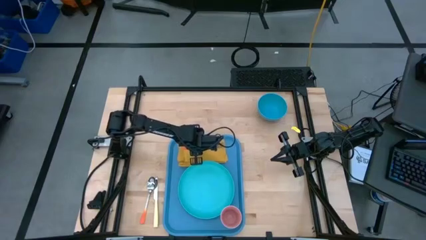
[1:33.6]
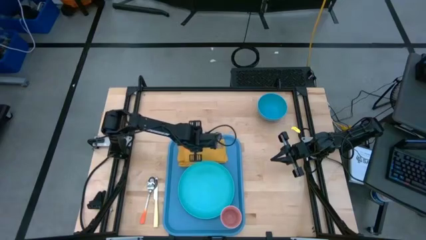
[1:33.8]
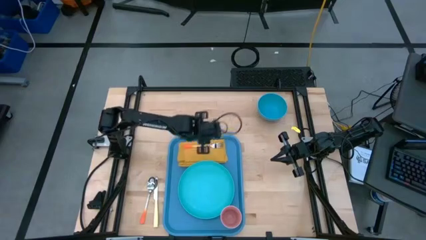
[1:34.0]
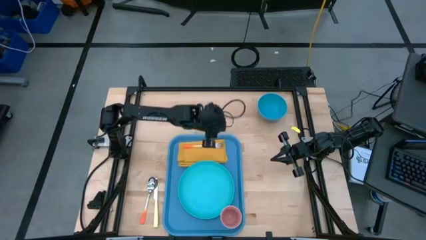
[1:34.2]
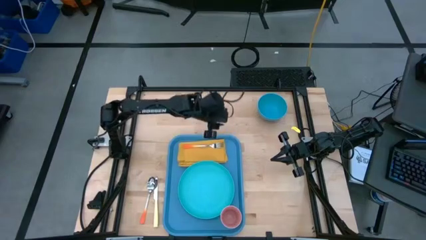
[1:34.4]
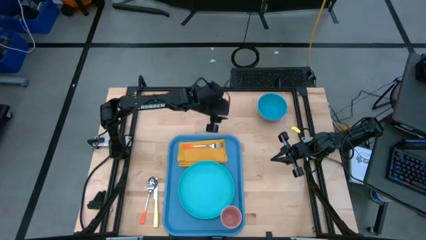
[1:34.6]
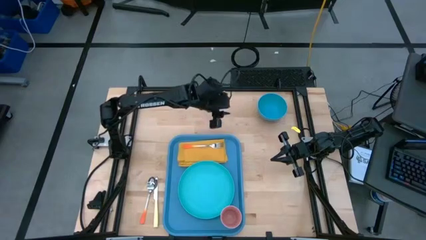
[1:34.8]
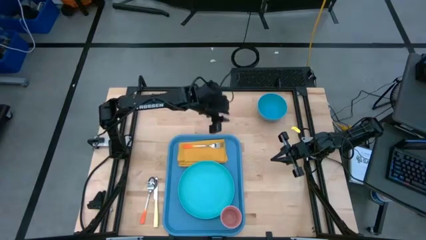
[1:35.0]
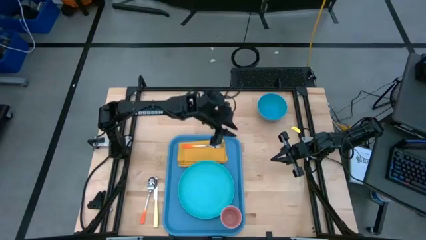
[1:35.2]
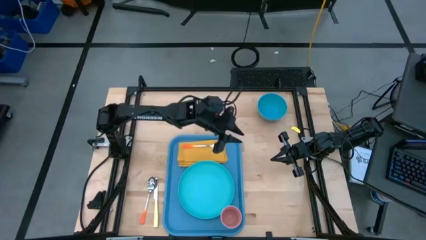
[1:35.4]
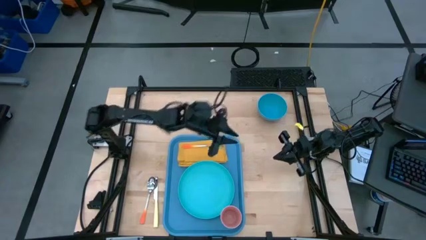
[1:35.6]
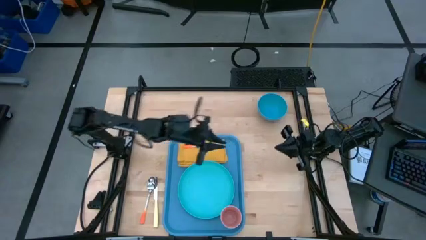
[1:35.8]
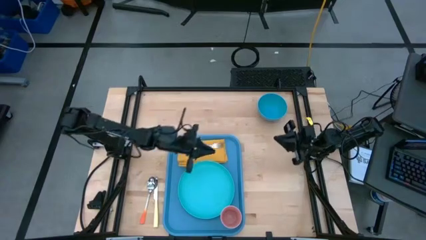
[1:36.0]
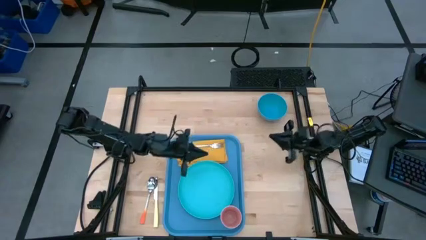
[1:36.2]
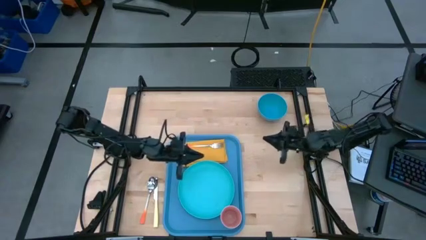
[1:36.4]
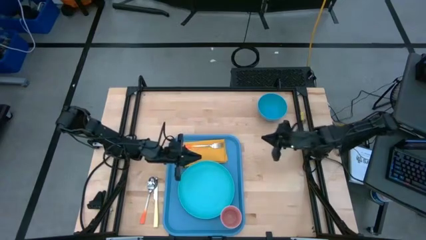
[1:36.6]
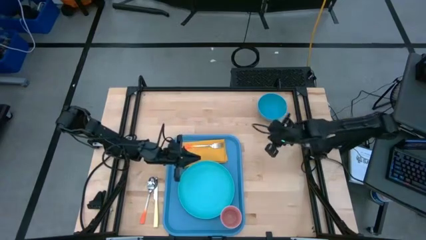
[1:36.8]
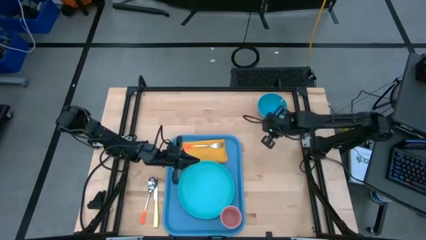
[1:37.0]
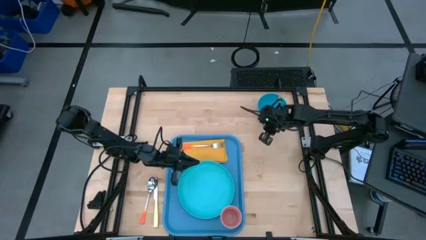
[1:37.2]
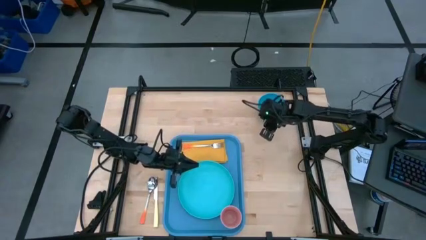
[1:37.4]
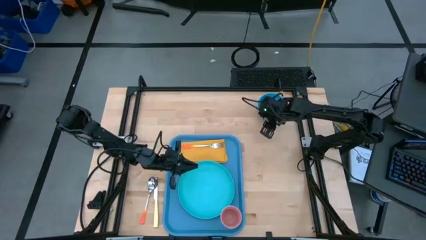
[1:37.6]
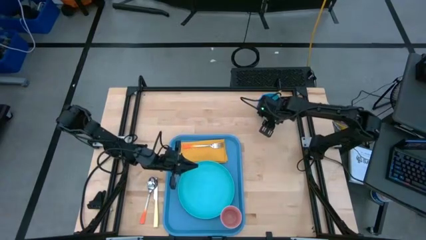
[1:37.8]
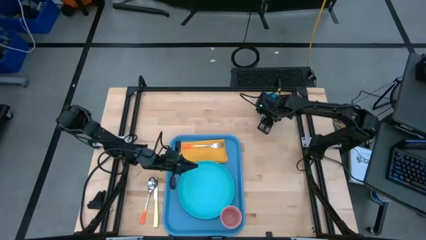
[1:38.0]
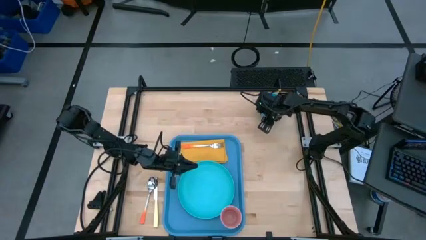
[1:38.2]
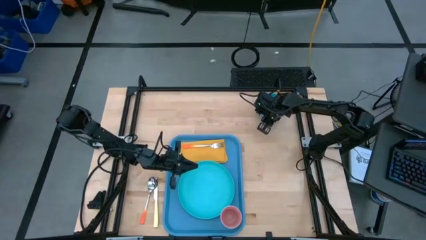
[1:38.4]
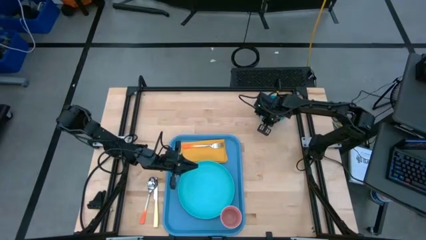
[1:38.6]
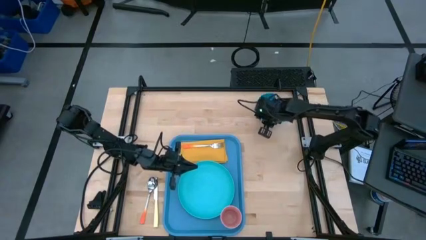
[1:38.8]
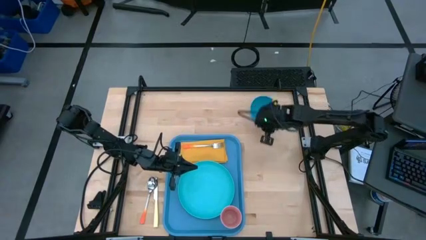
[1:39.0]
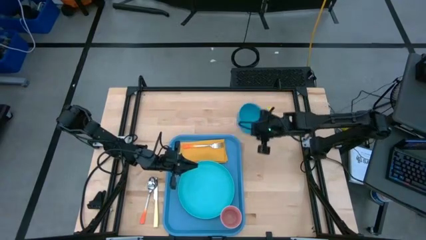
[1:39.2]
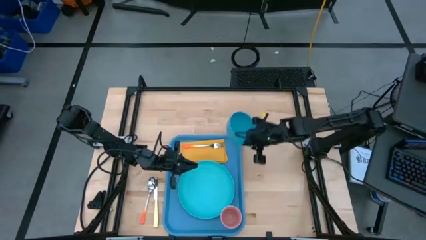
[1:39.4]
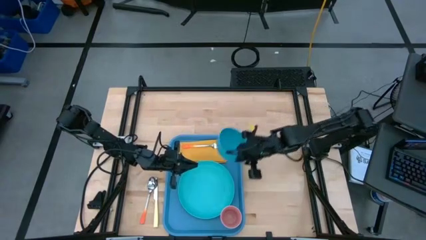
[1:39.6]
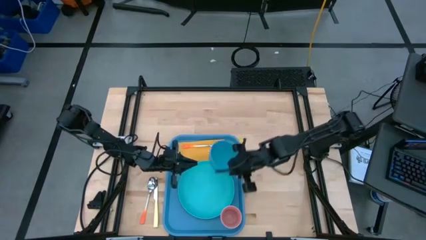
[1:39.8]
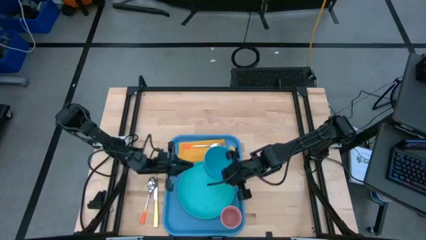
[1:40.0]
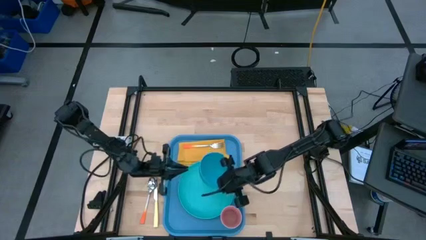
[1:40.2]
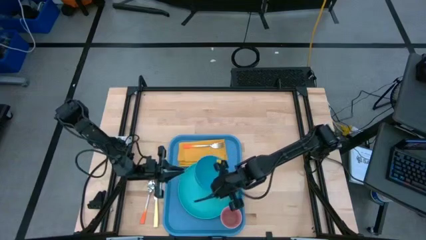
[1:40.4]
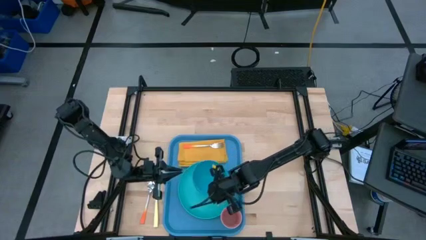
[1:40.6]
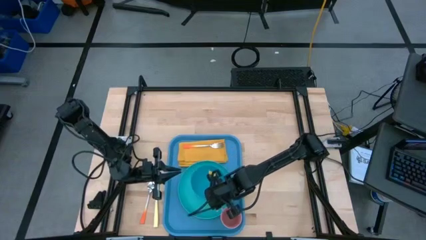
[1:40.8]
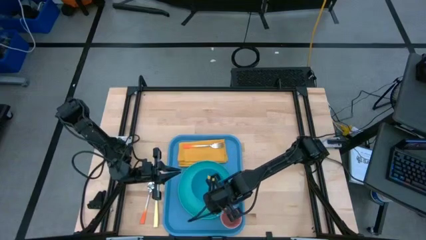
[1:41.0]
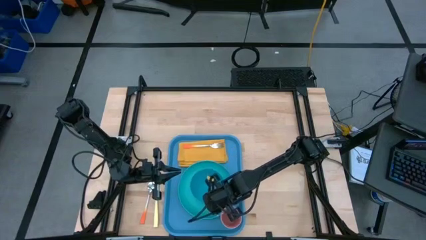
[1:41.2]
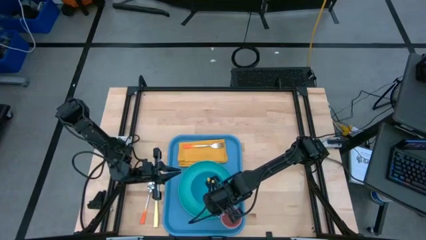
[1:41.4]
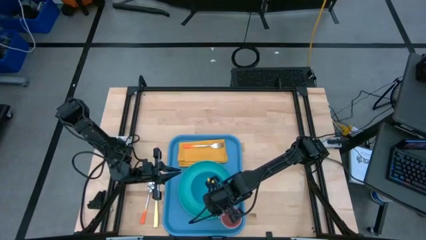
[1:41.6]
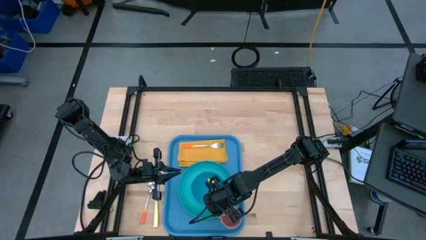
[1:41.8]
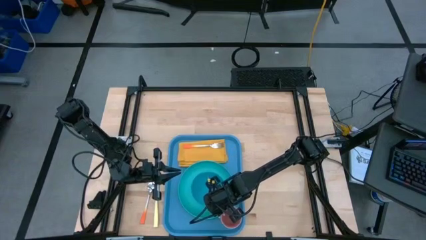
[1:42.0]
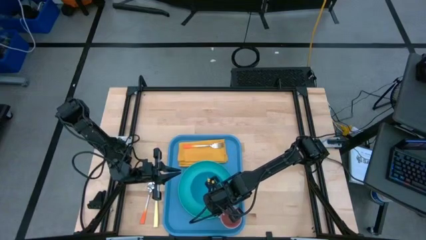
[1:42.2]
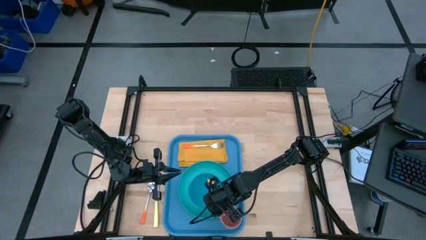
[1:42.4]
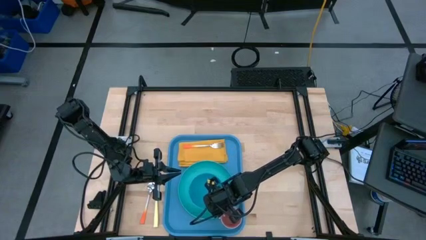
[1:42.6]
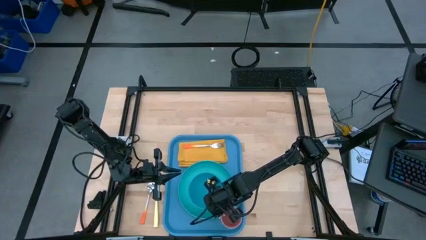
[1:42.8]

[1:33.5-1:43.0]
Task: Set up tray
Put the blue bowl on the blue plate on the blue serving tray

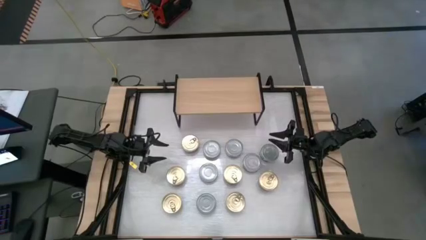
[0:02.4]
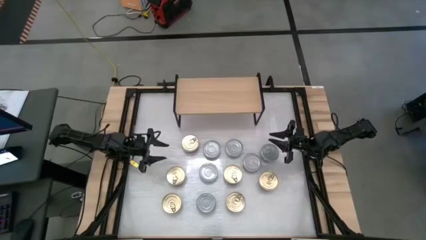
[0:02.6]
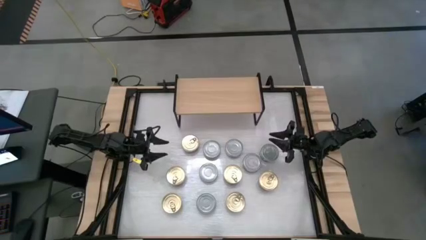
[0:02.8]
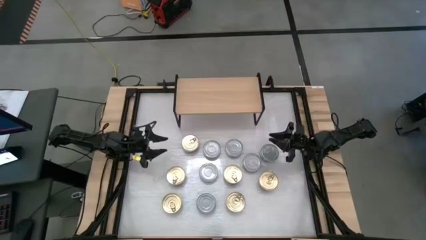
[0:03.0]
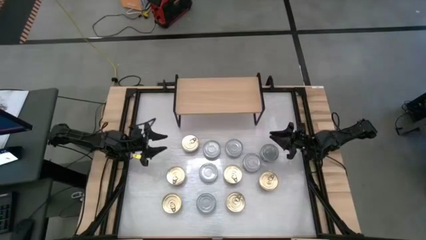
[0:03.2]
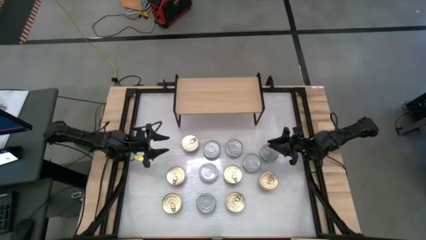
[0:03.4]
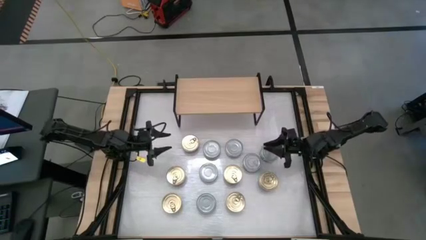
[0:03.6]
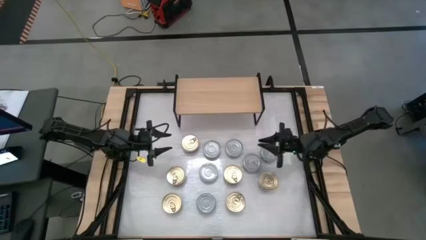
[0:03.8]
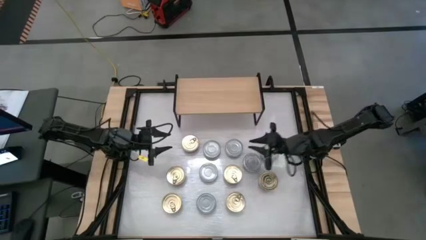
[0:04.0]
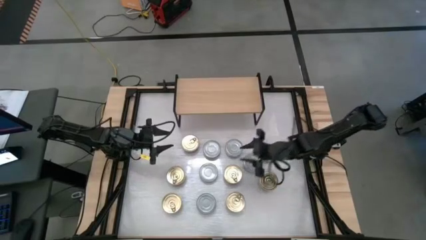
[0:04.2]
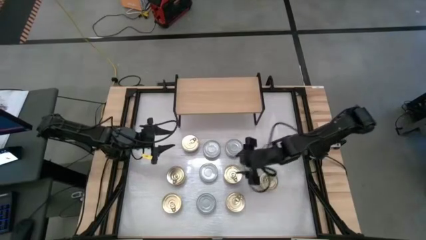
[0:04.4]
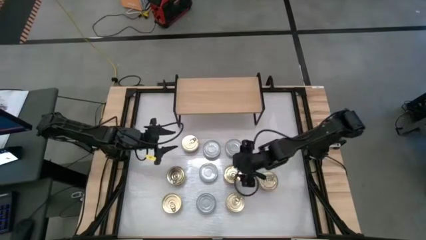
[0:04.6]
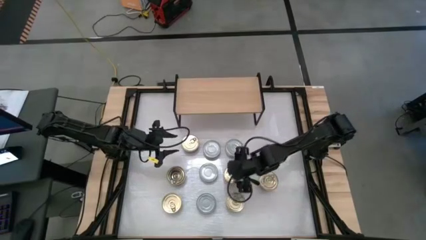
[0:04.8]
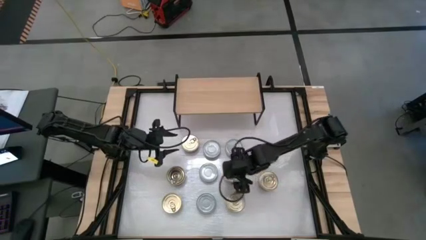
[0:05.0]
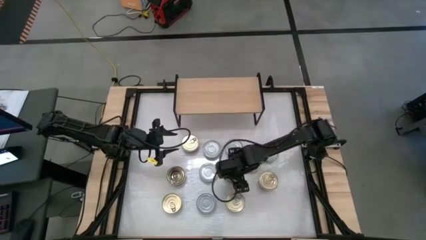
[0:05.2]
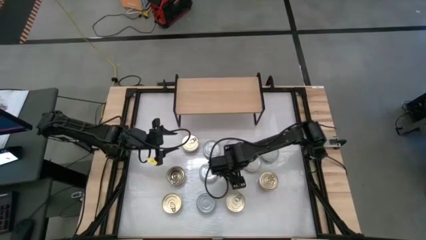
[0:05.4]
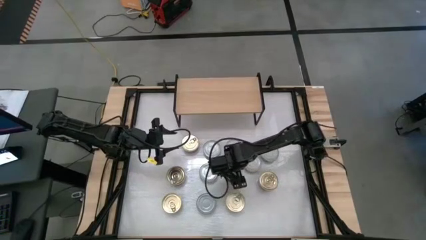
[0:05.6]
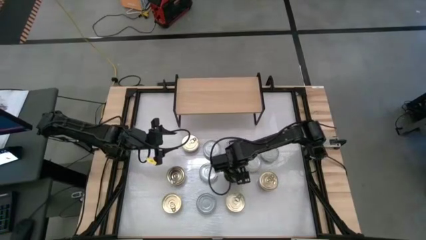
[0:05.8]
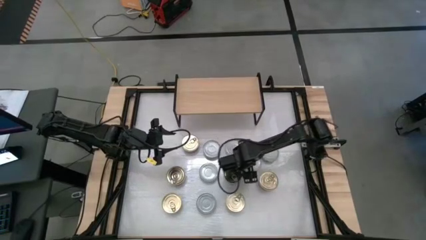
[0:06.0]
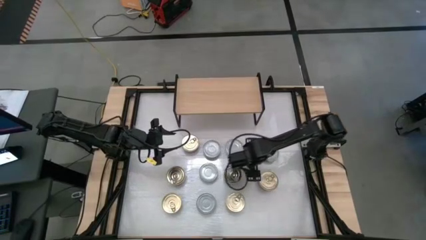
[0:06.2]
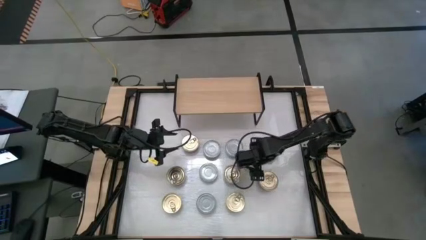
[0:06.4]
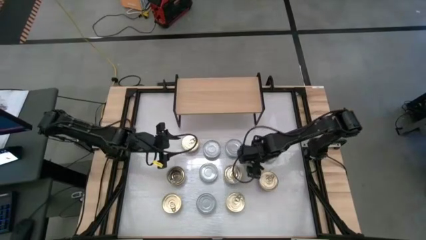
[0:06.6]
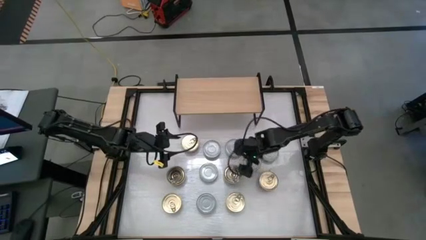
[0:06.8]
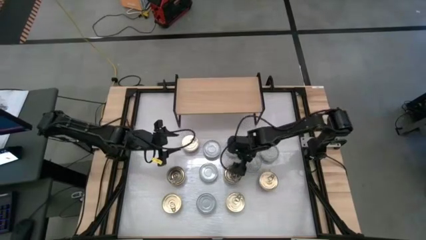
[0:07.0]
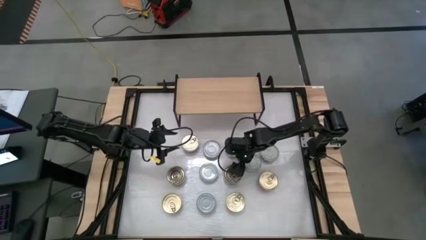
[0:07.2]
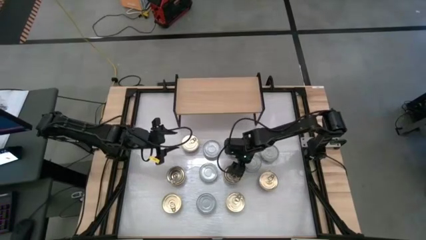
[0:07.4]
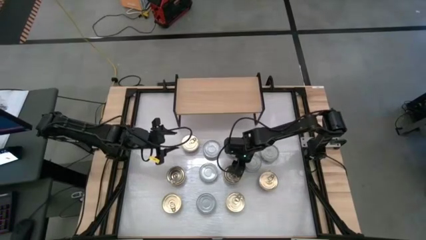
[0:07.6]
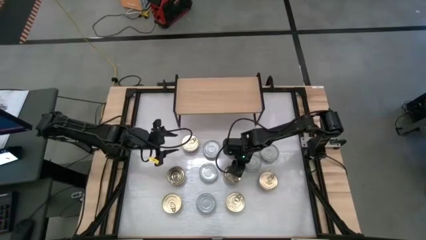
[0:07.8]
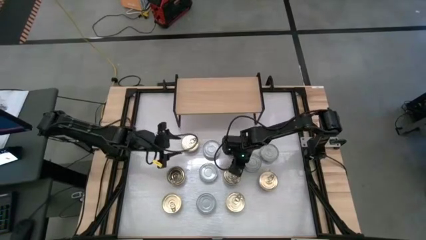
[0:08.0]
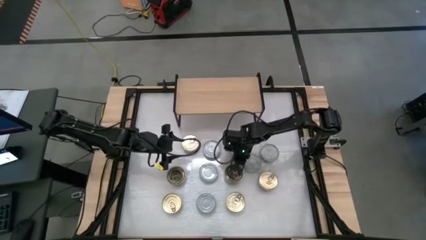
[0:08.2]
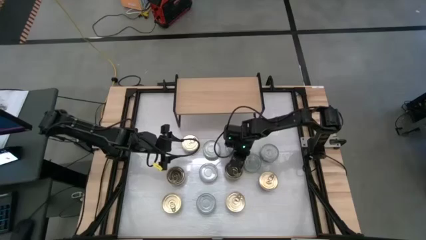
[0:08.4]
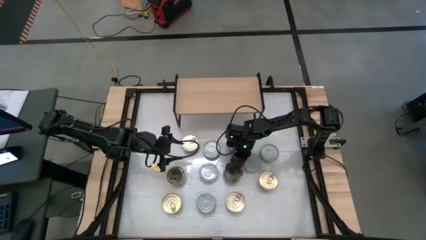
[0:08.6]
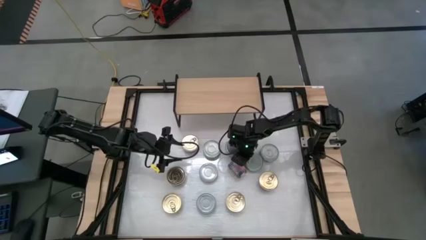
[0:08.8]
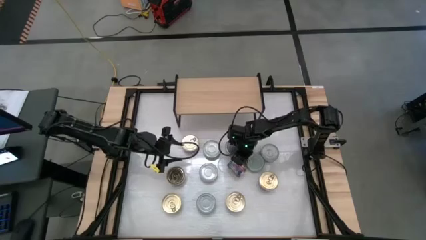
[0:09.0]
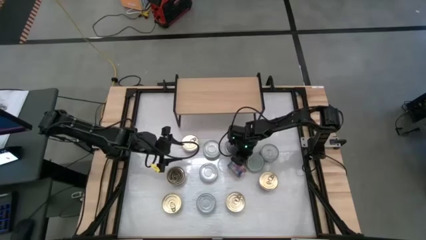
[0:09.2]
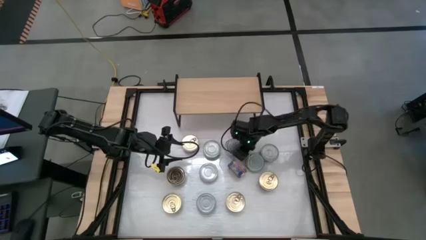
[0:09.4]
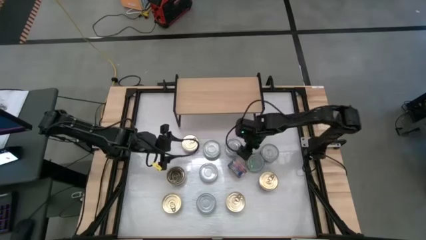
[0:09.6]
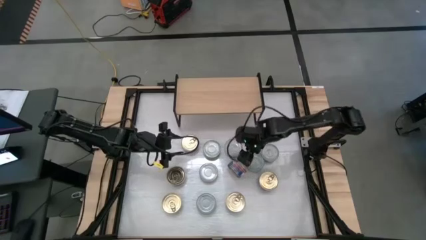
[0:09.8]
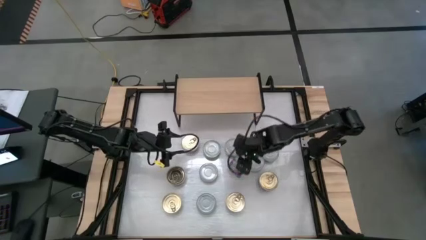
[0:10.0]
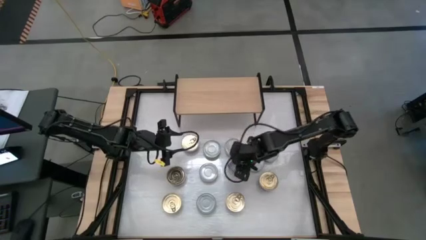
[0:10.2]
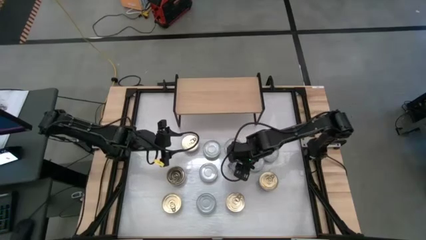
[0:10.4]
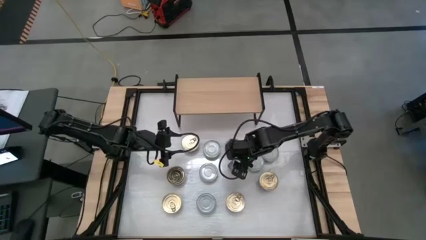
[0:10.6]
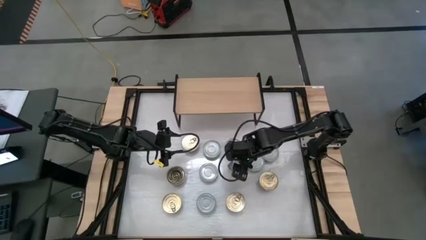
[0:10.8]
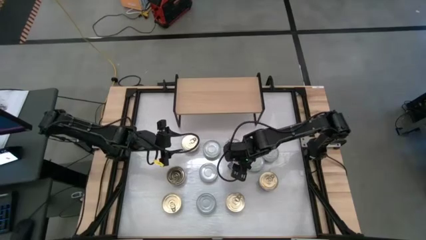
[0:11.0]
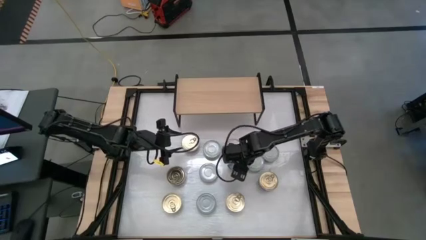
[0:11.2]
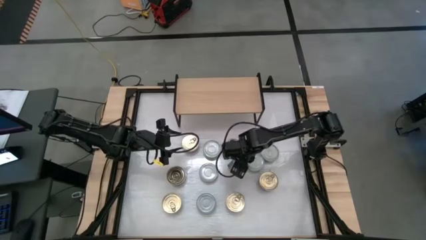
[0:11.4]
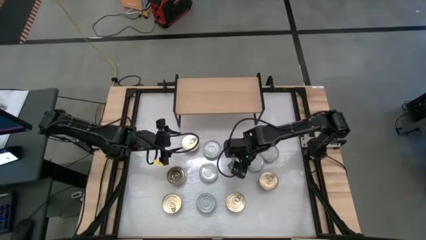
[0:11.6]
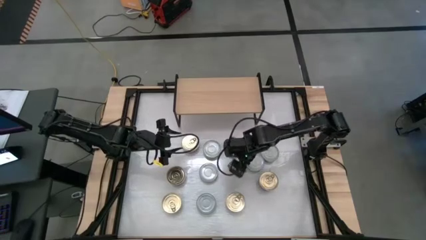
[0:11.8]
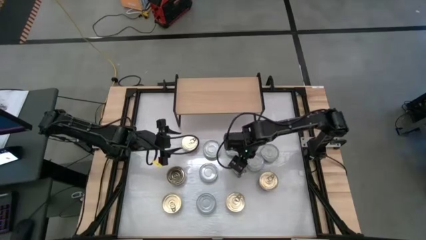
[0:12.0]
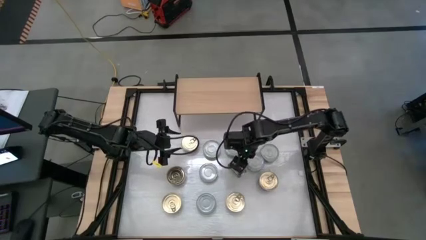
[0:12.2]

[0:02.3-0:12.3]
Task: Stack canned seafood by type on shelf
Put the blue tuna can on the shelf
